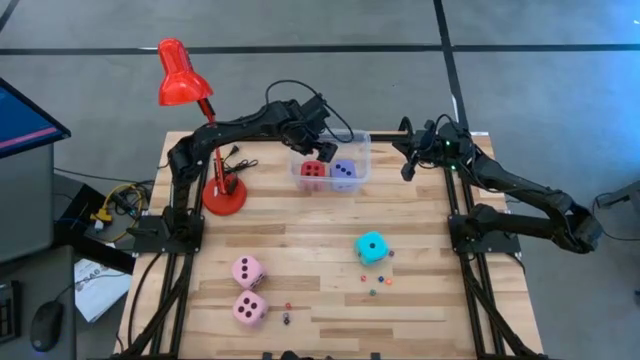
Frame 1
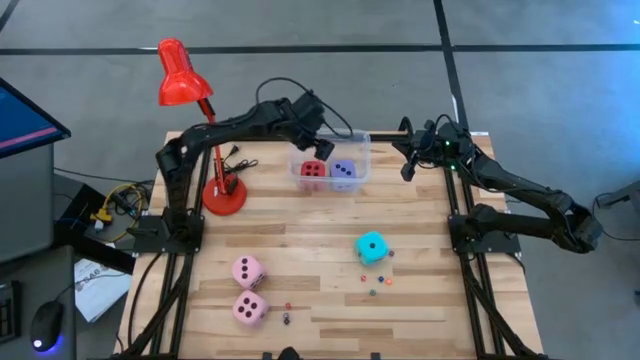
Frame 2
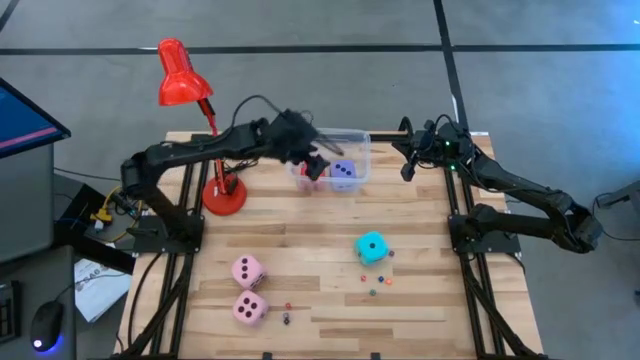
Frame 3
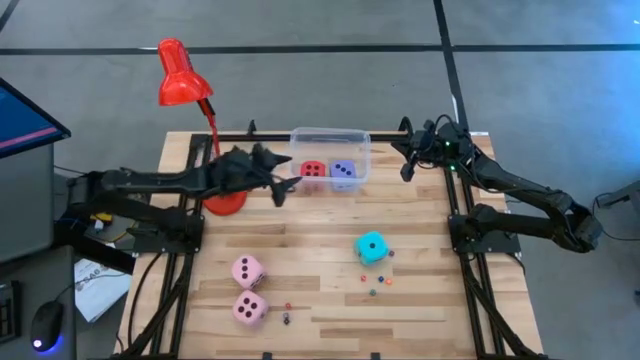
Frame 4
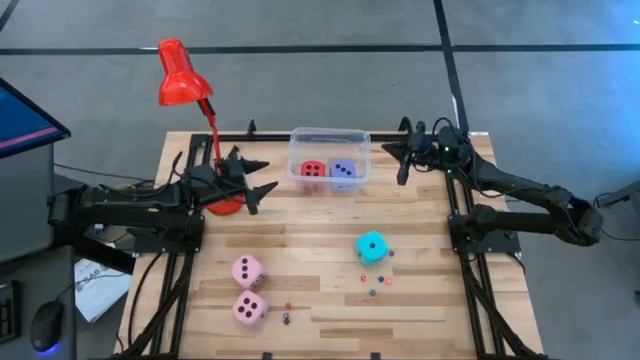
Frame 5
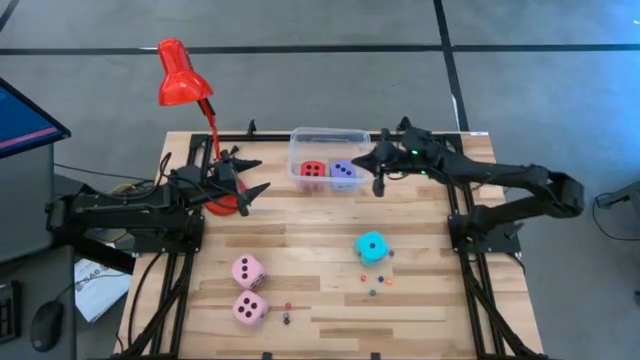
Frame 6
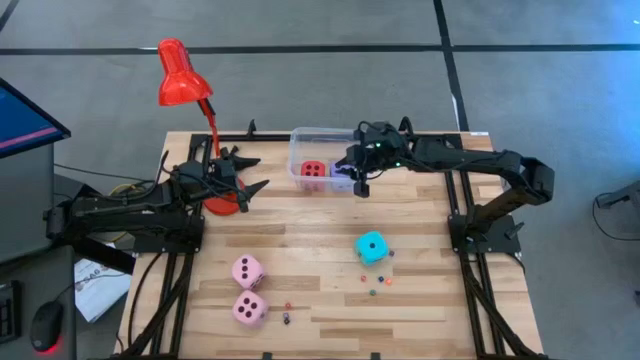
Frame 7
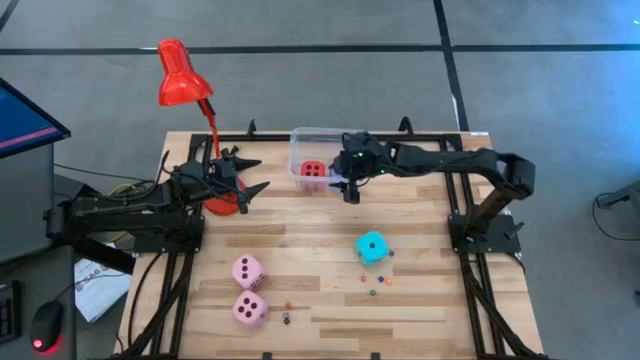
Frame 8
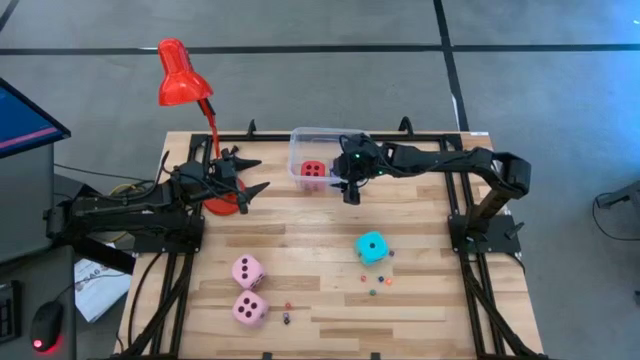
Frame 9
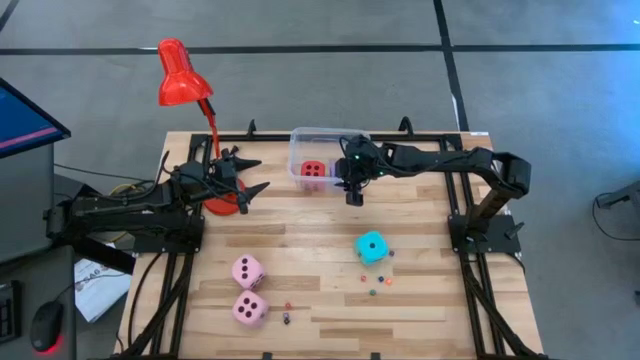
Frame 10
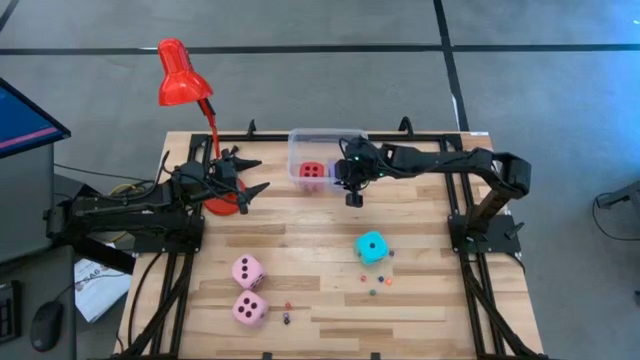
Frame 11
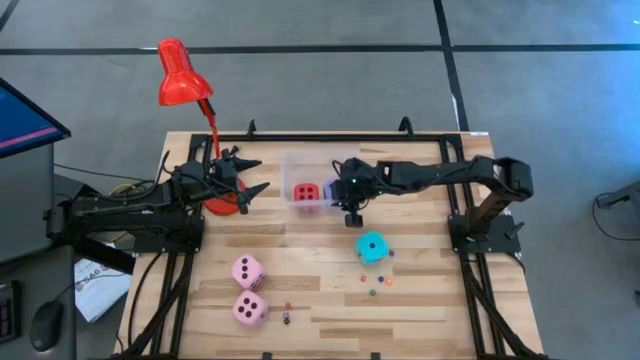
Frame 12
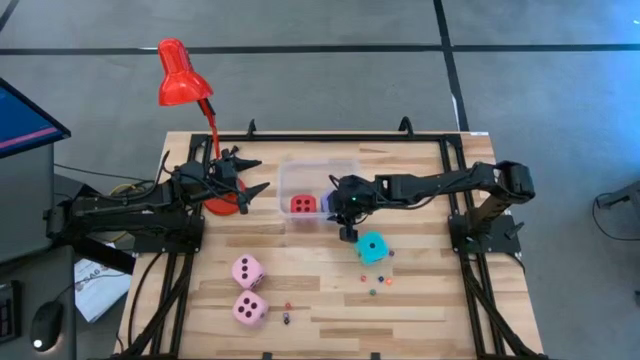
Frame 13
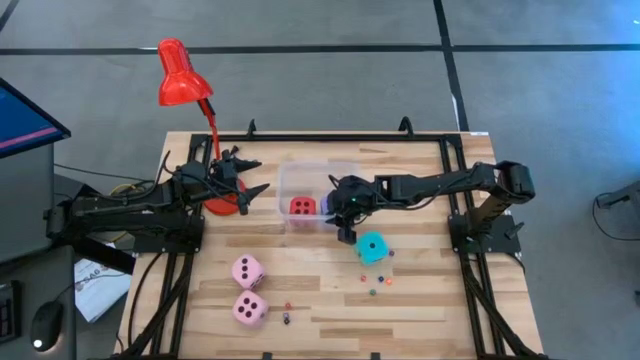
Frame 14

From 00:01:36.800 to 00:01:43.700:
Task: Pick & Place Dice
Move the transparent bin

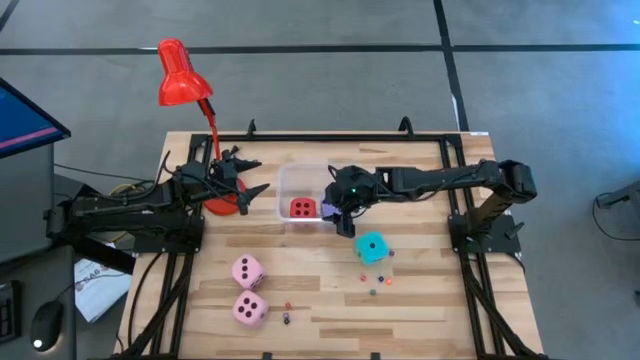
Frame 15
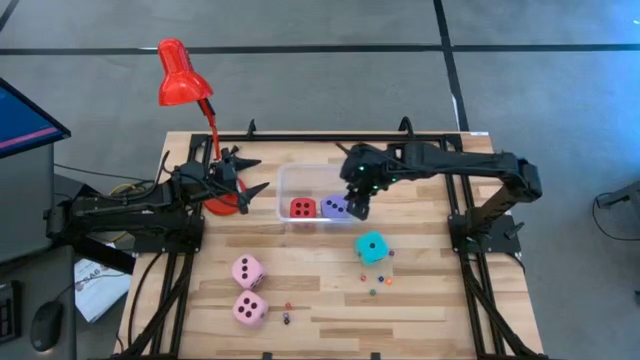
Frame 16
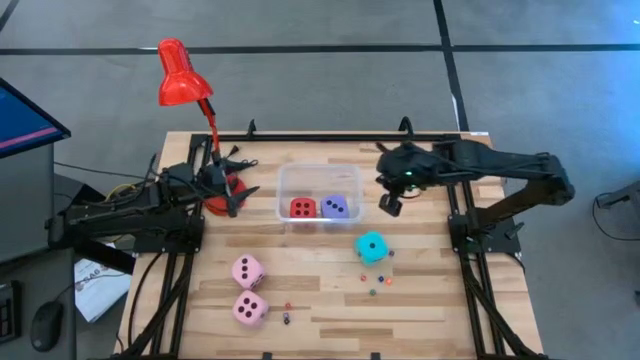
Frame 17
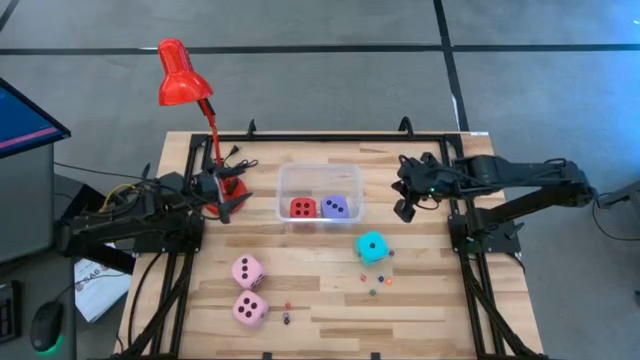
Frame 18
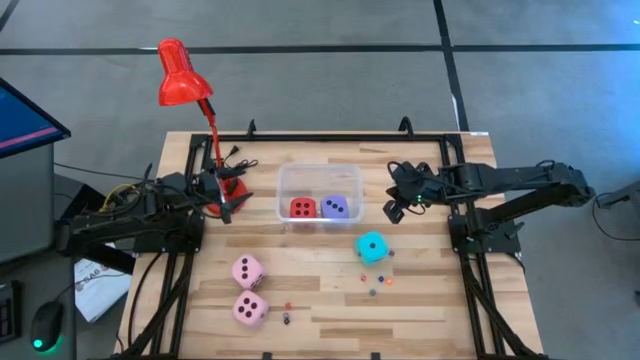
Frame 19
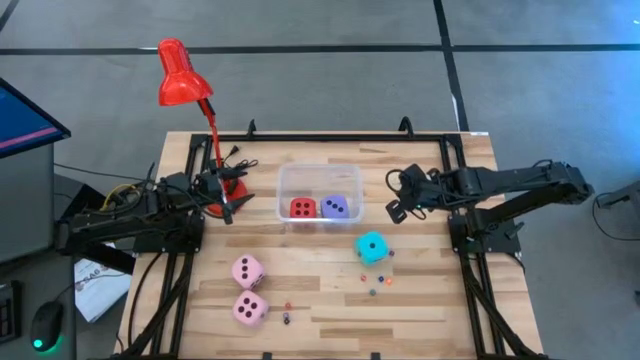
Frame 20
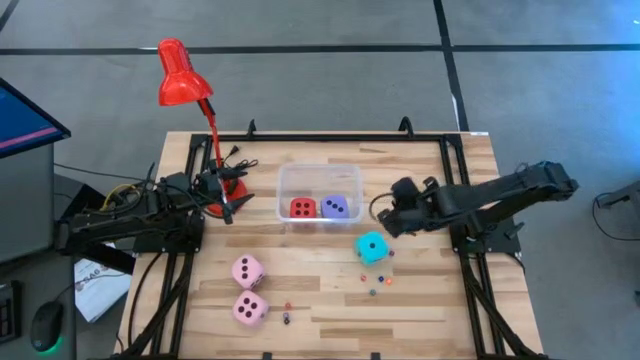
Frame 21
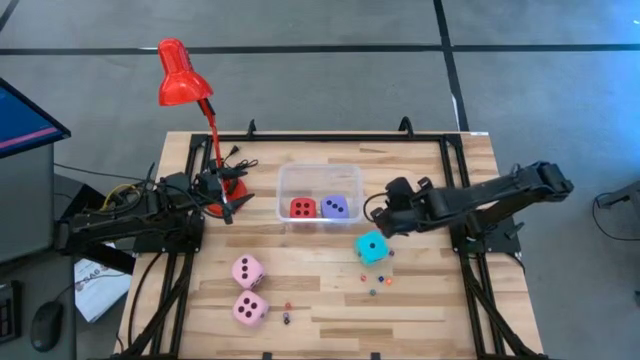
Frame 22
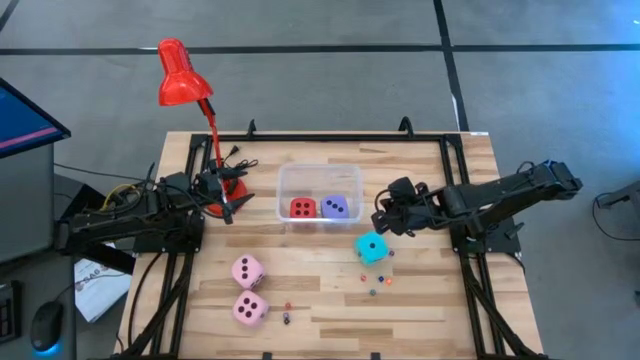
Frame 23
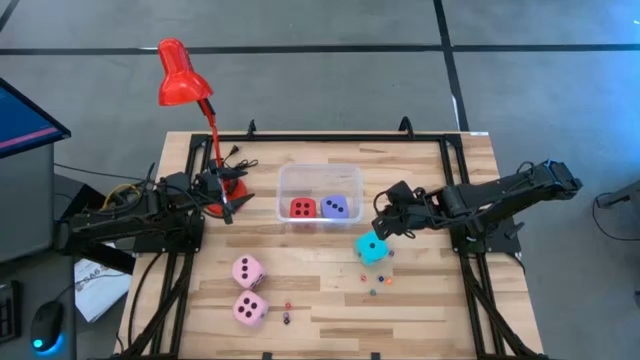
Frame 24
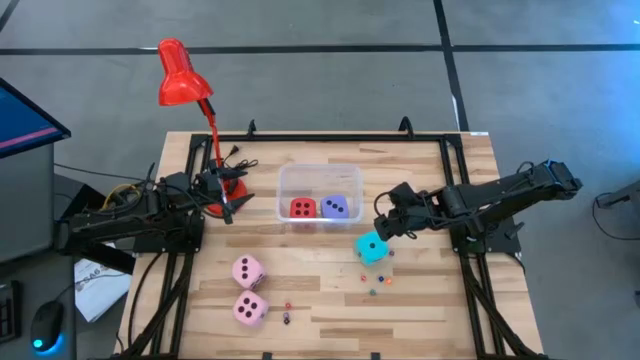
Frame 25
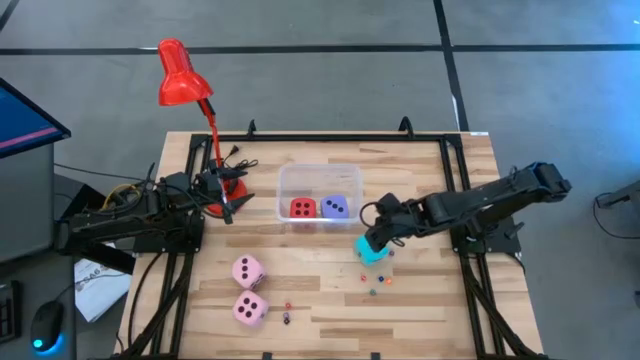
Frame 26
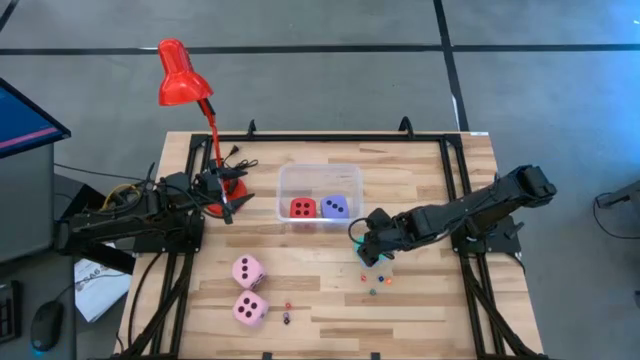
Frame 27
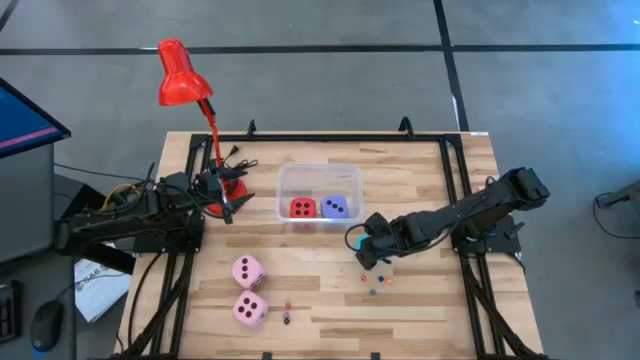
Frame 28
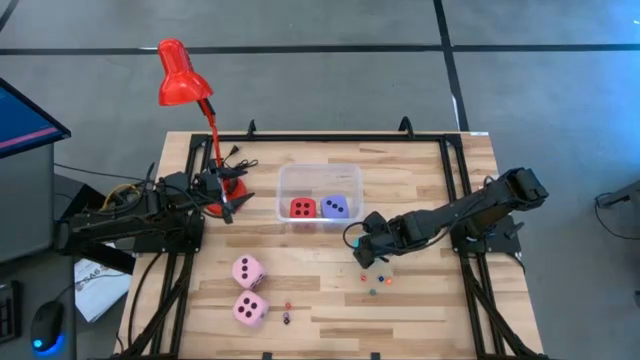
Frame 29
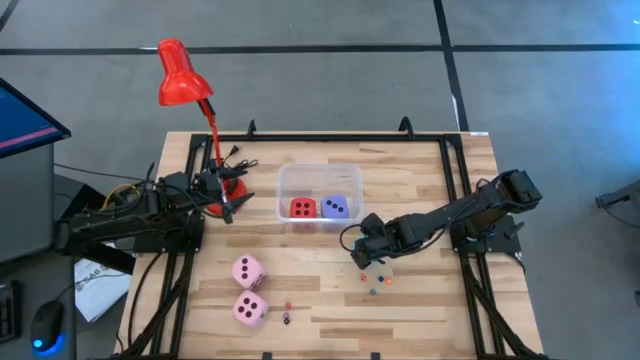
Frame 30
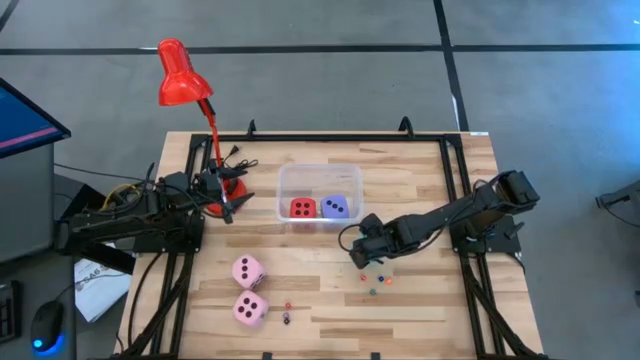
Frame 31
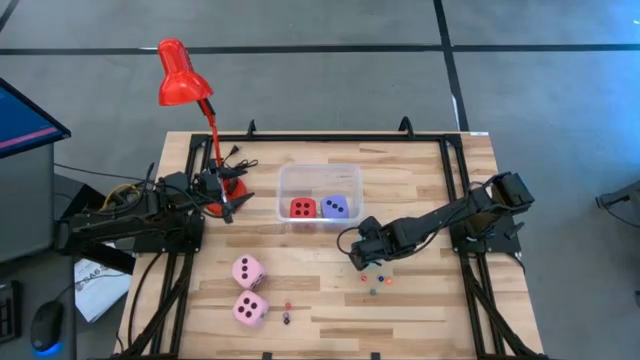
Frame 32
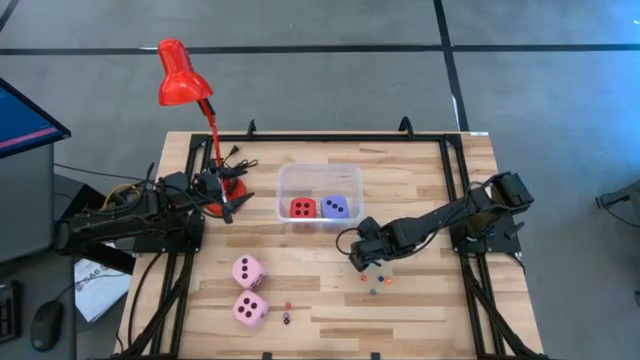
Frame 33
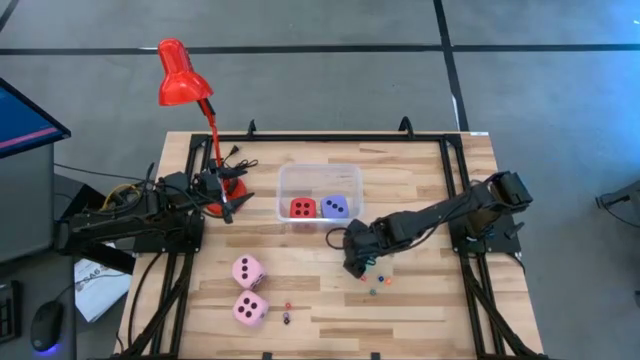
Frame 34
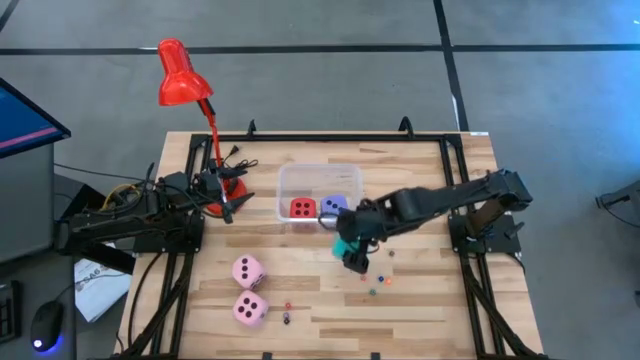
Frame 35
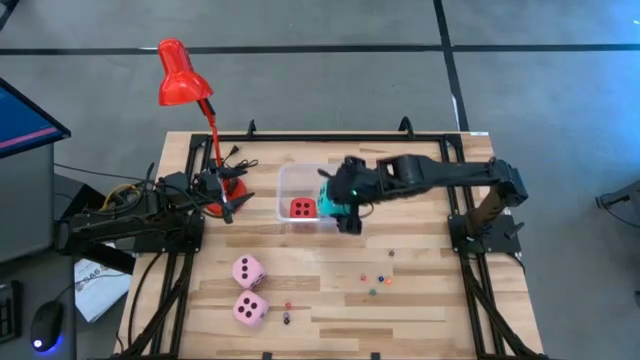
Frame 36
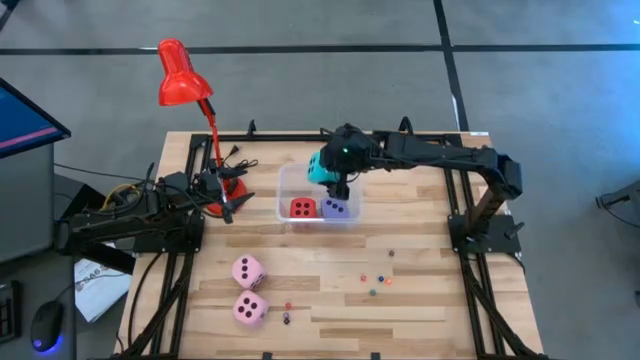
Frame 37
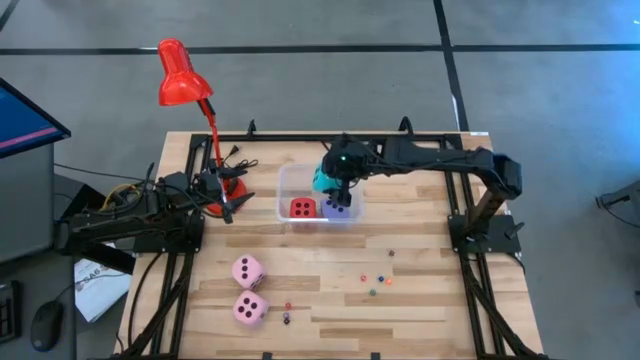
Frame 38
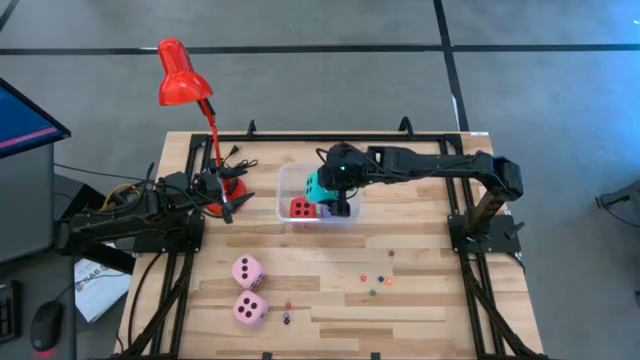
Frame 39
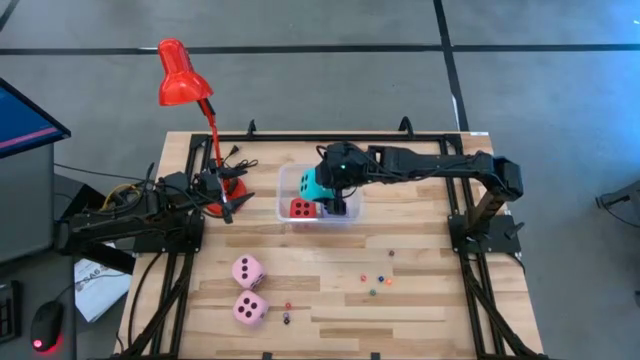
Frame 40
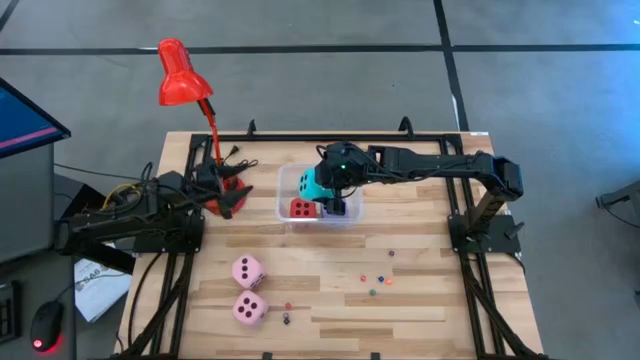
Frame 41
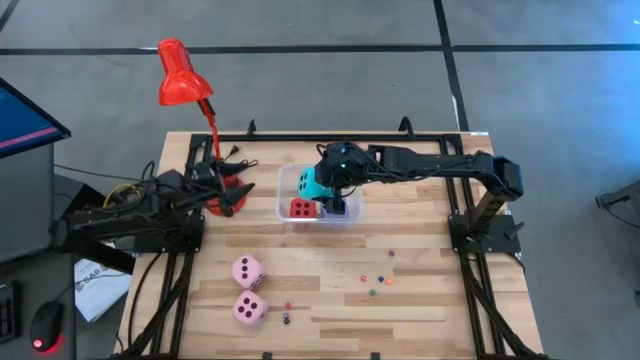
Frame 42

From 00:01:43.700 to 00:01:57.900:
Put the large blue die into the transparent bin
